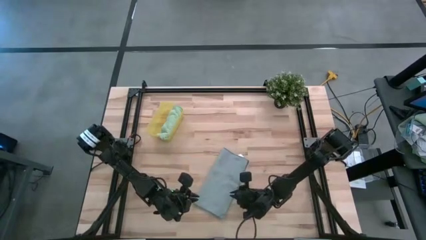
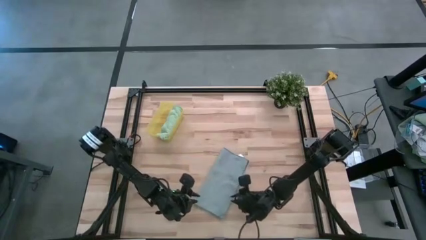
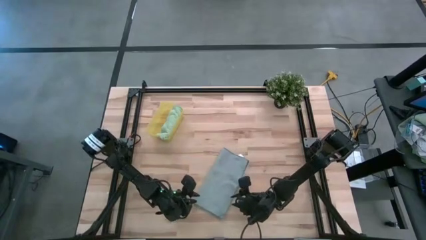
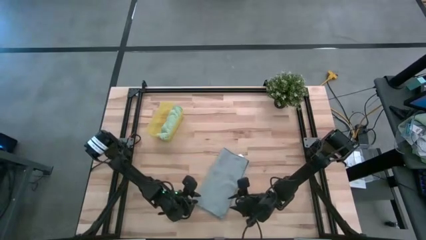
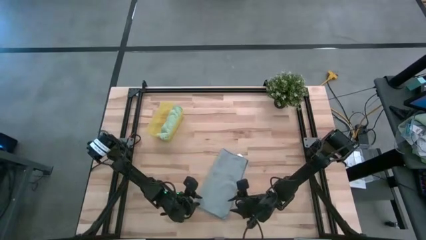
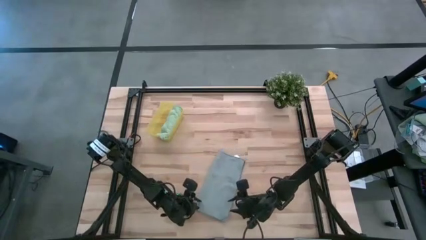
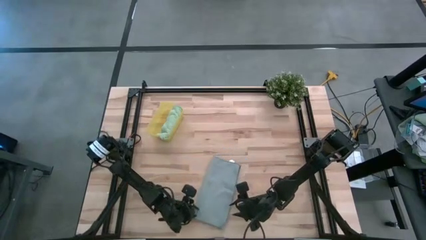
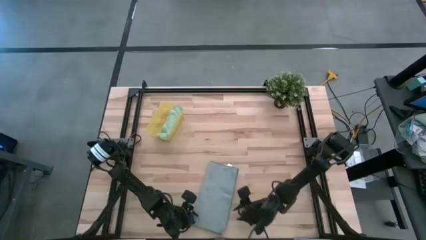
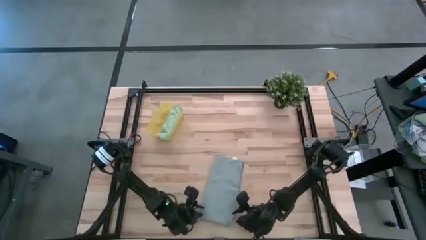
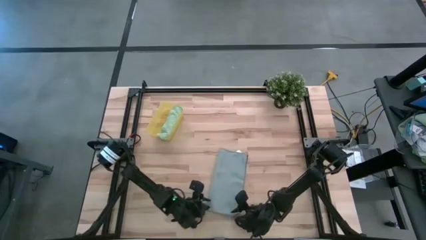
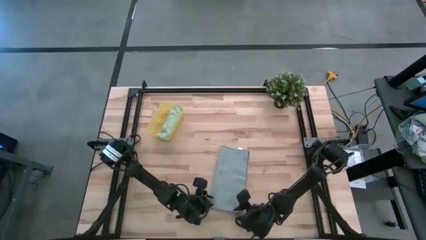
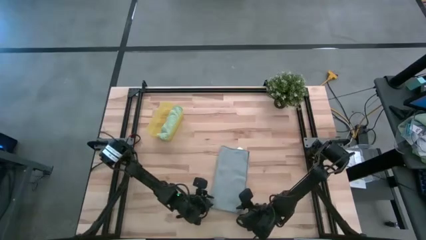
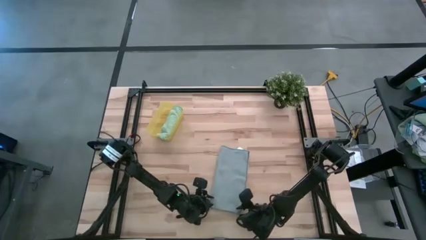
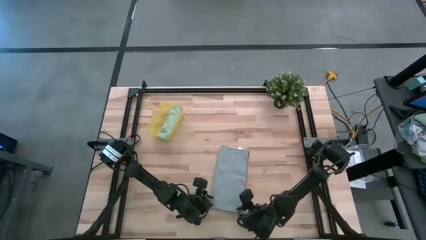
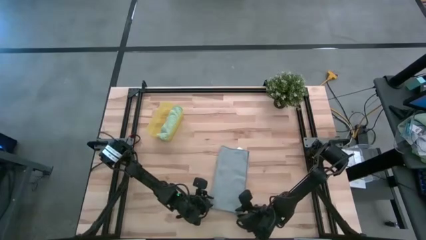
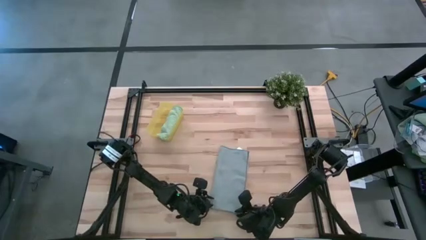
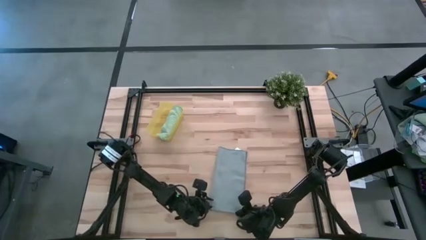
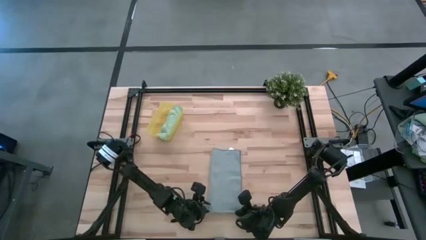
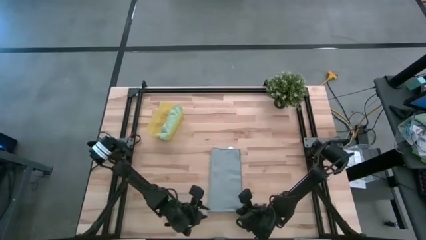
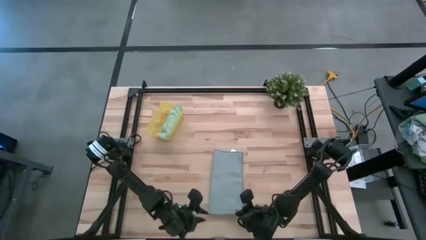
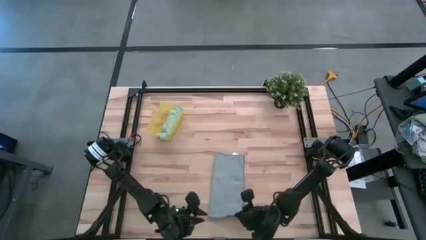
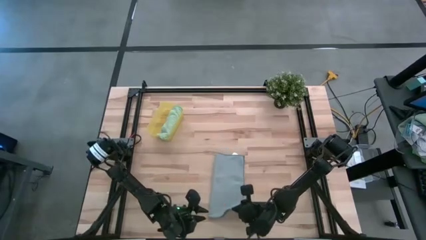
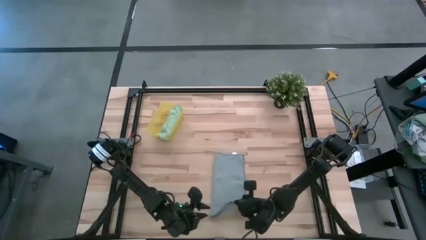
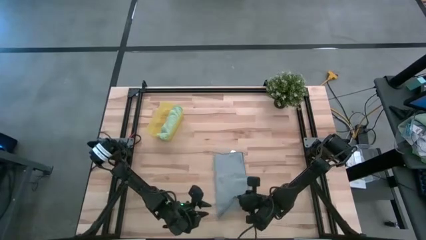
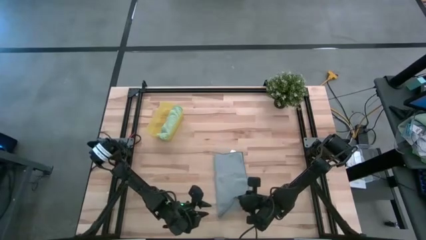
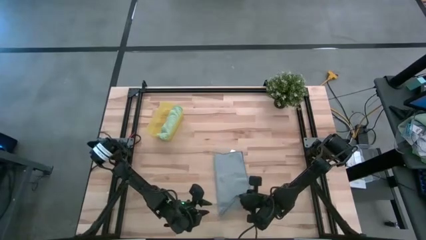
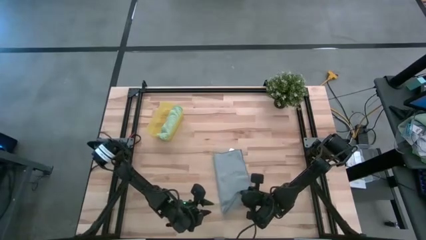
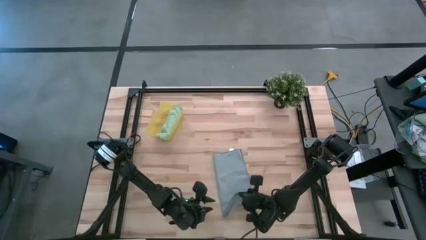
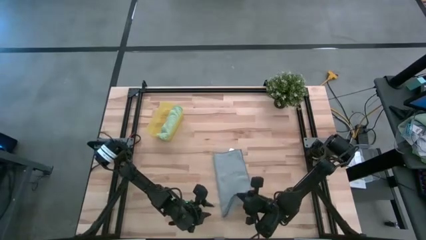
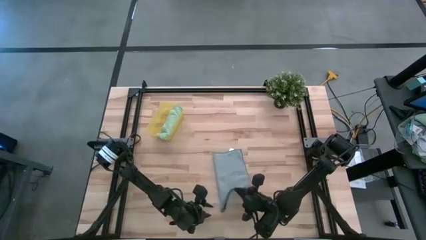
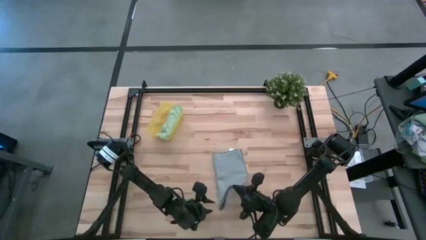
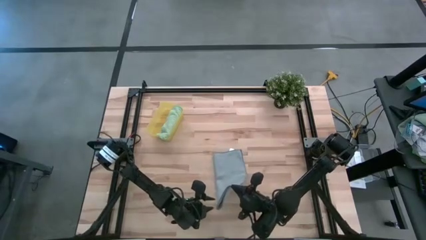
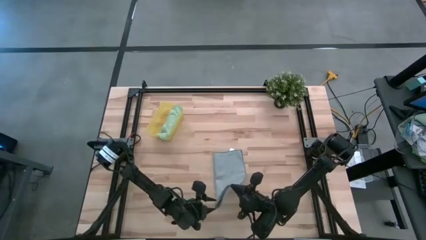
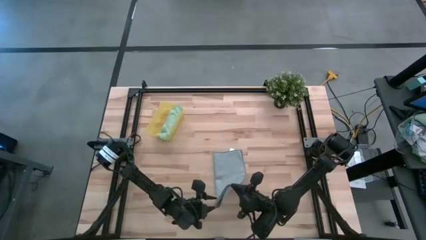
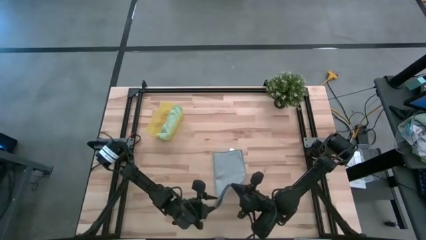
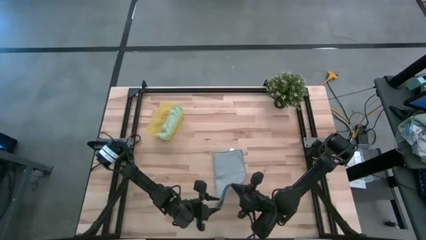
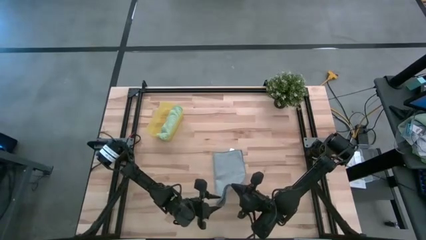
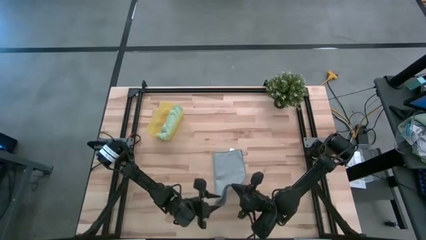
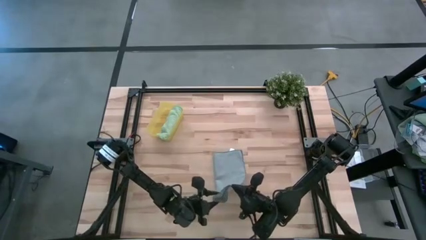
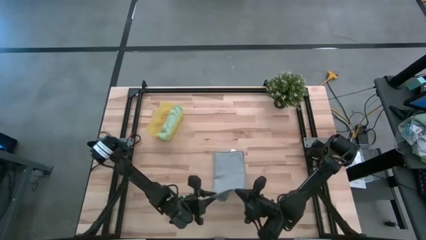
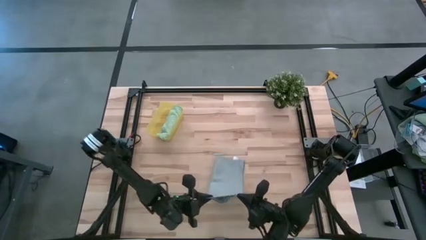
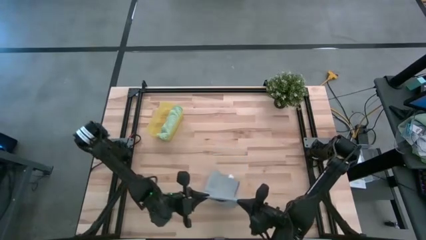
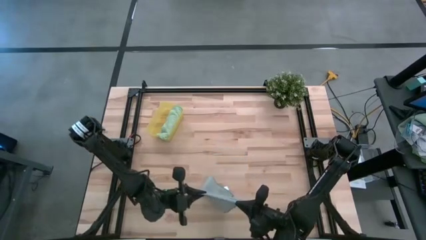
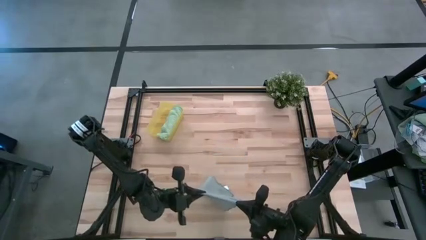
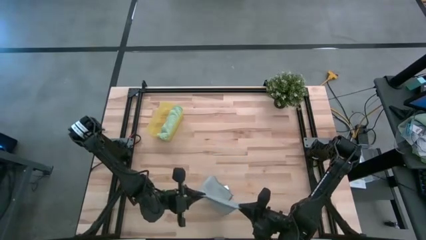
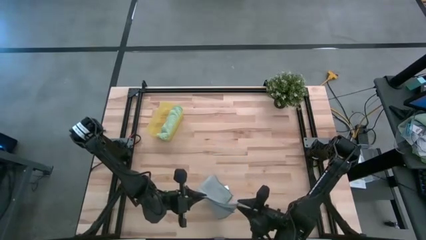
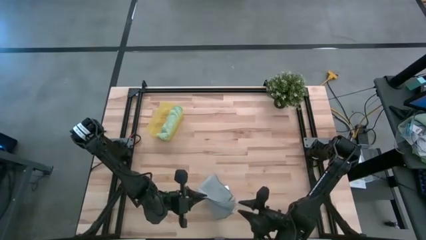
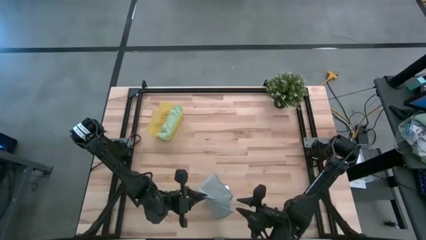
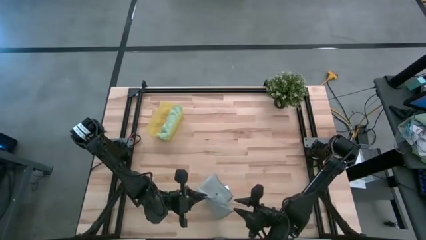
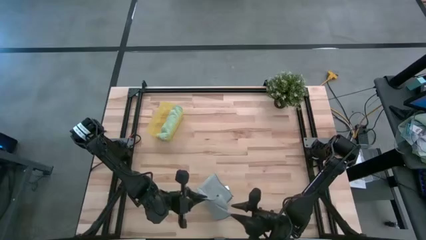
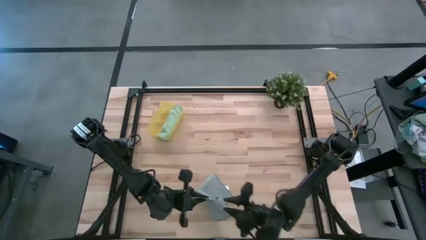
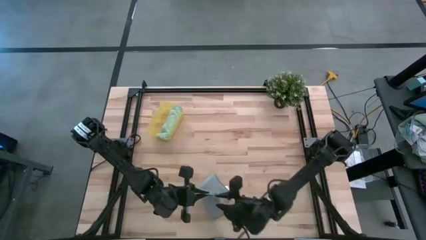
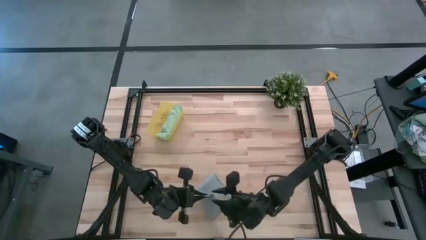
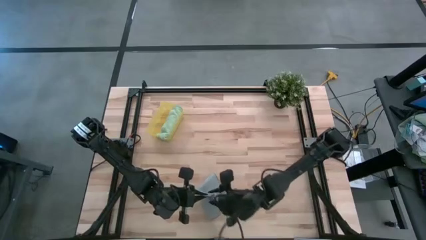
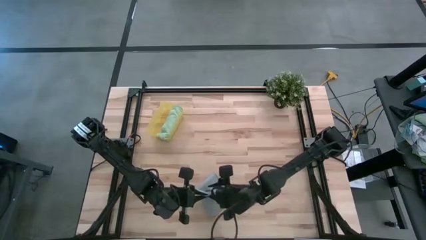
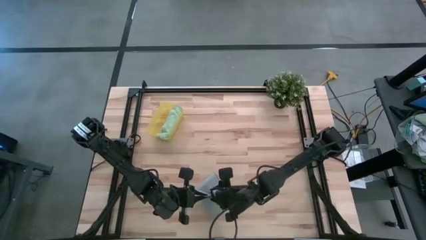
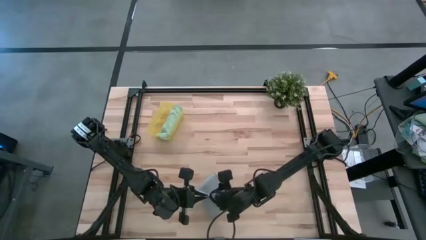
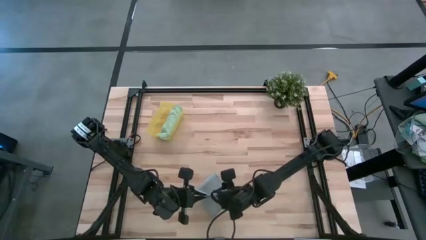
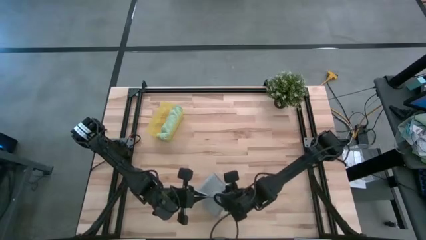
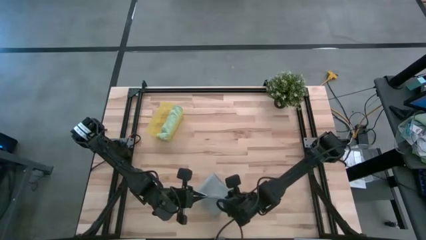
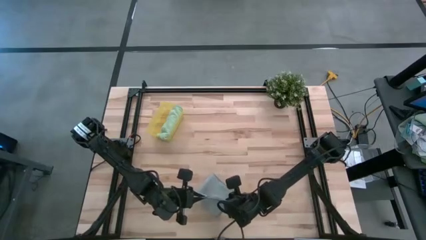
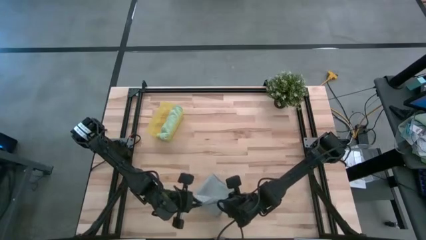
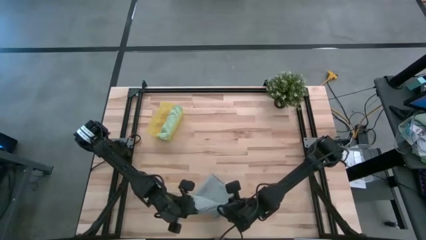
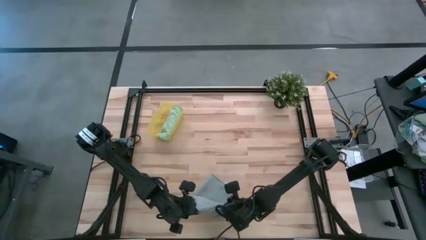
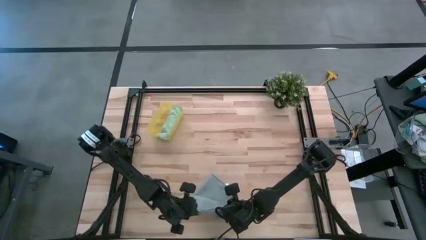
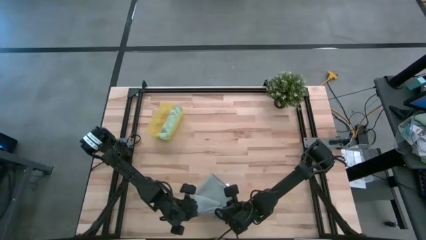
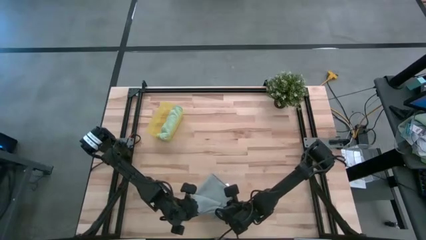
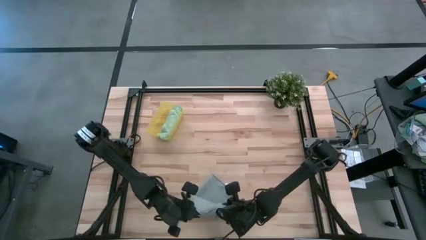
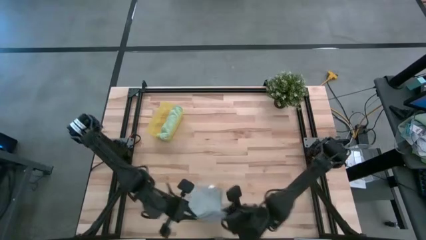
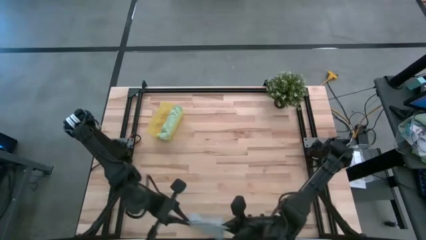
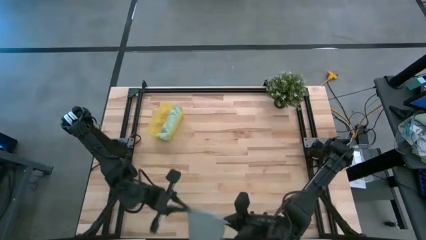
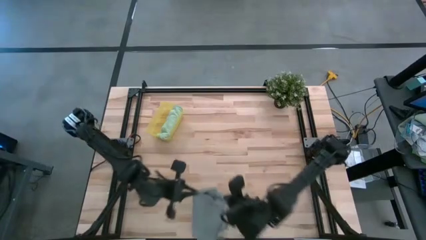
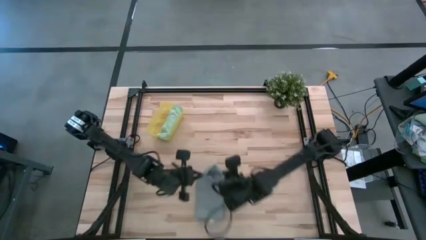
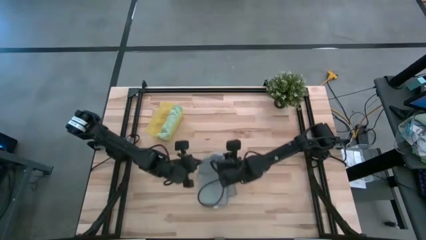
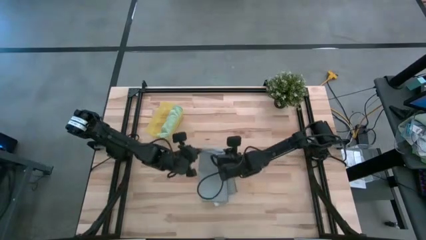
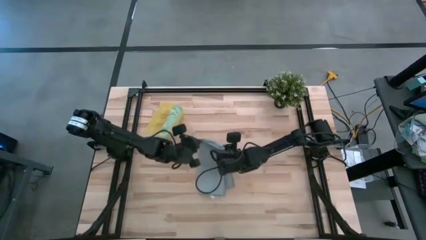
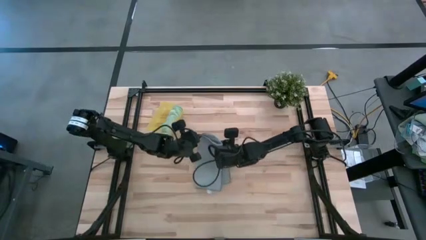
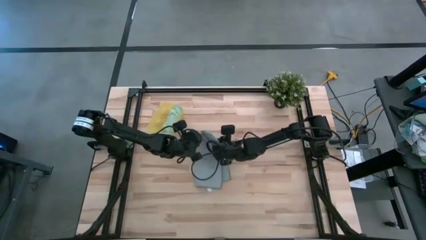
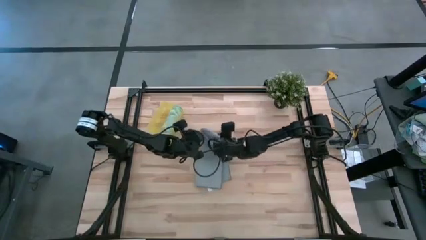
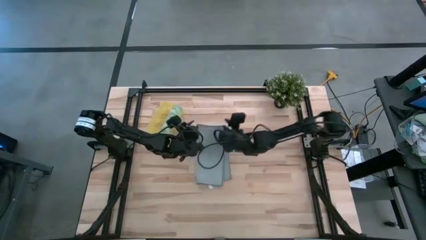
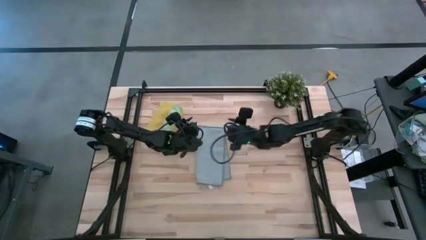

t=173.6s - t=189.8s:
Task: Roll microfiber towels into tight, uniform cylinder then place into a basket
Fold the gray towel
